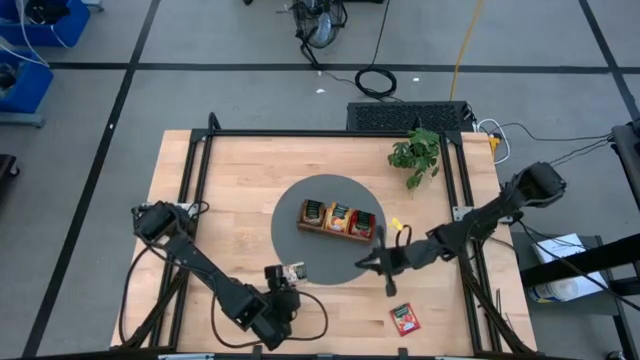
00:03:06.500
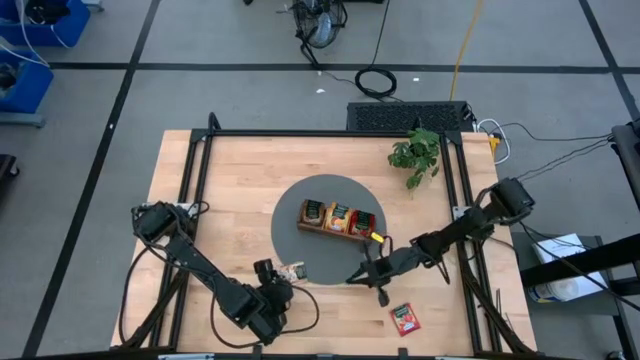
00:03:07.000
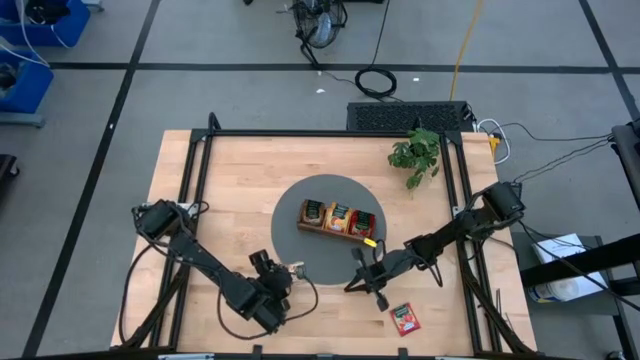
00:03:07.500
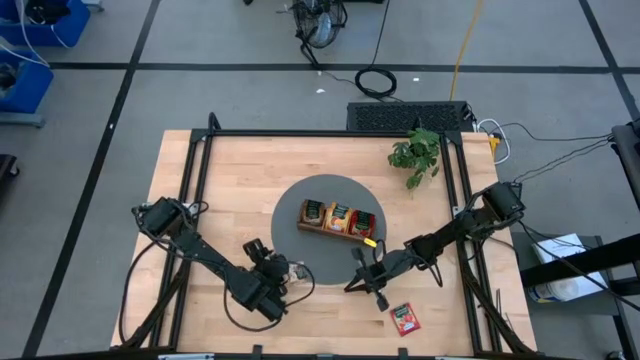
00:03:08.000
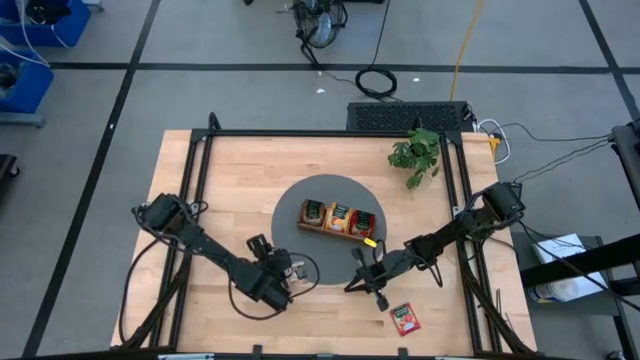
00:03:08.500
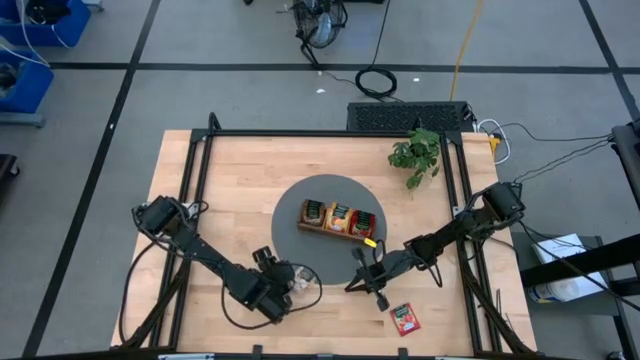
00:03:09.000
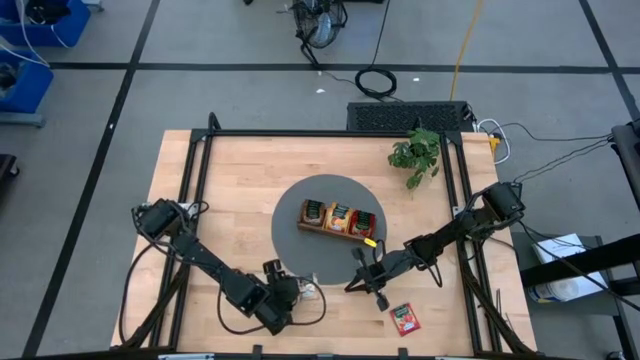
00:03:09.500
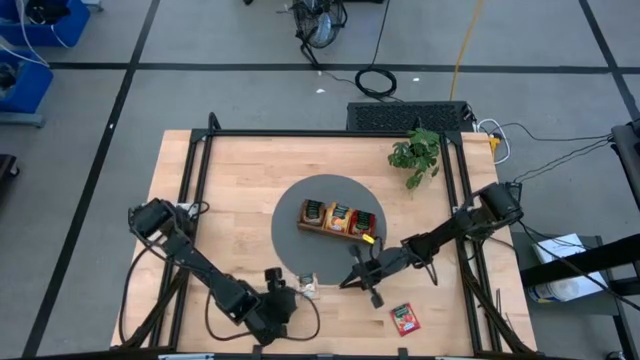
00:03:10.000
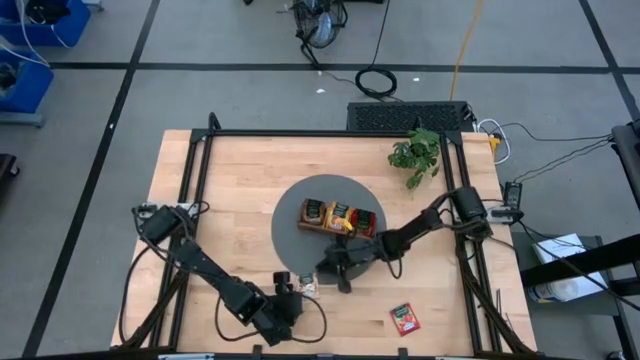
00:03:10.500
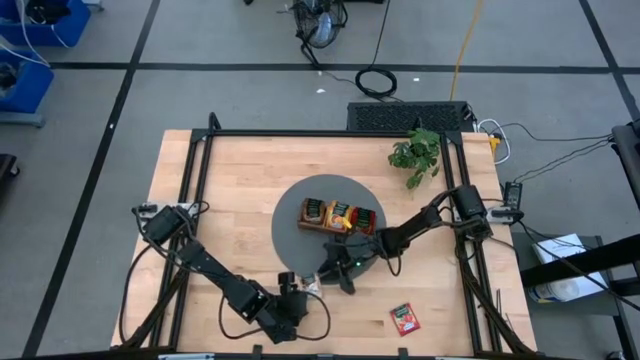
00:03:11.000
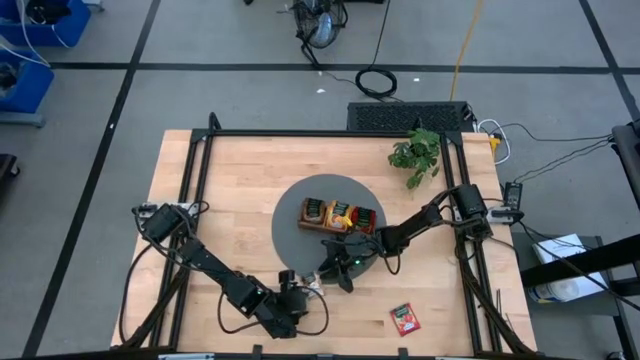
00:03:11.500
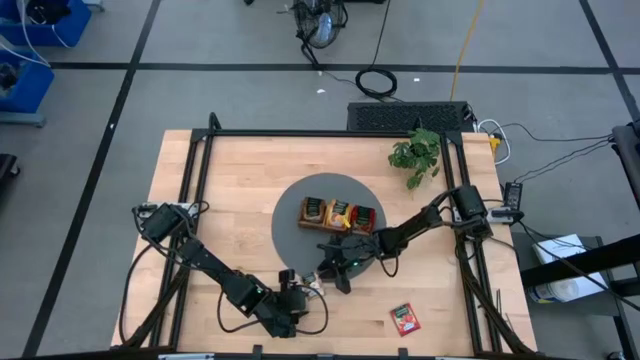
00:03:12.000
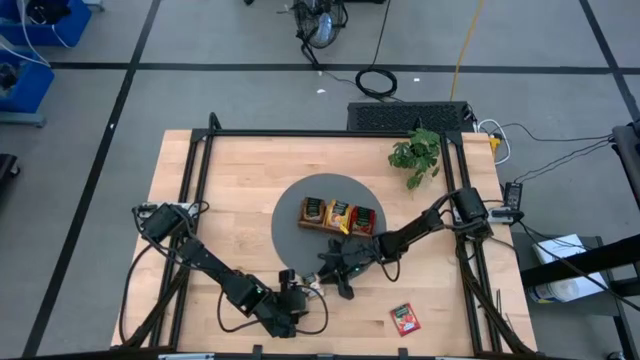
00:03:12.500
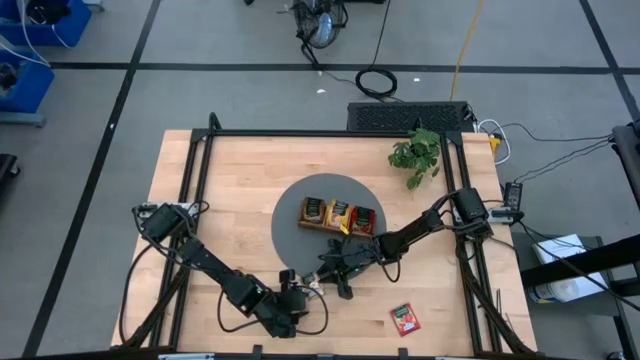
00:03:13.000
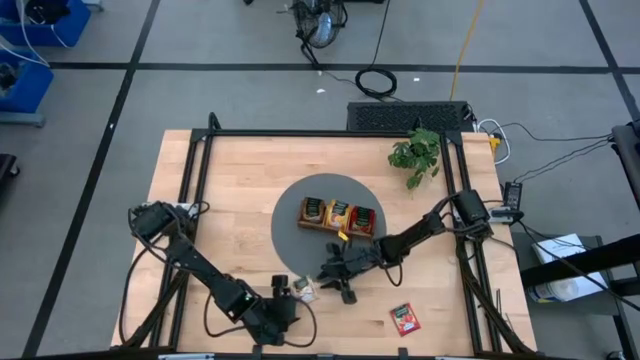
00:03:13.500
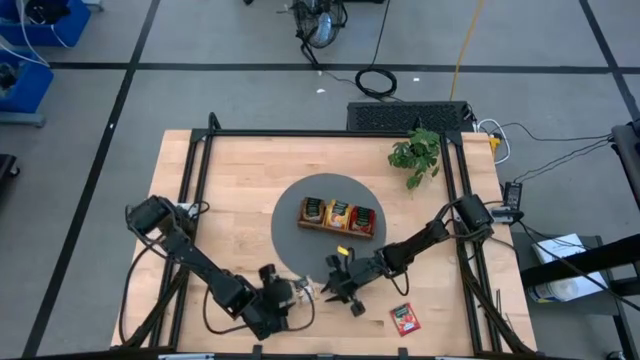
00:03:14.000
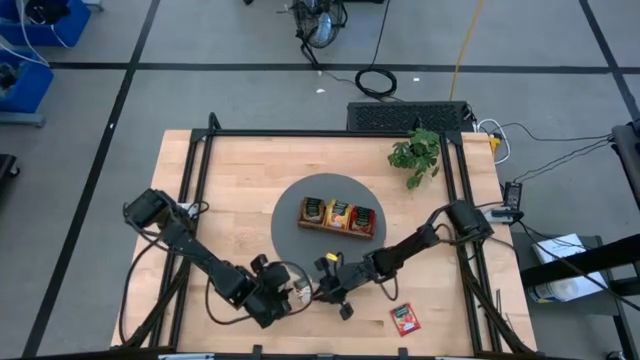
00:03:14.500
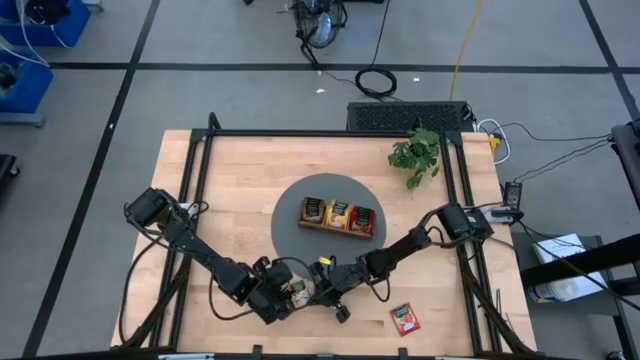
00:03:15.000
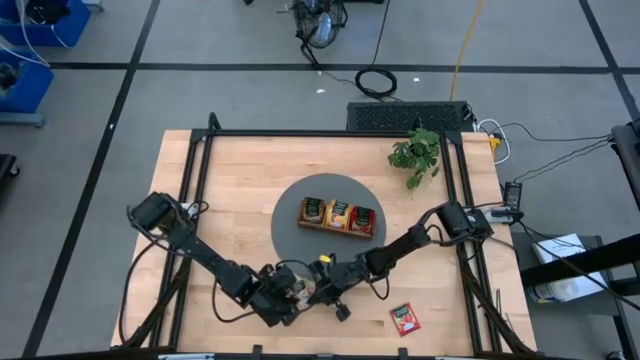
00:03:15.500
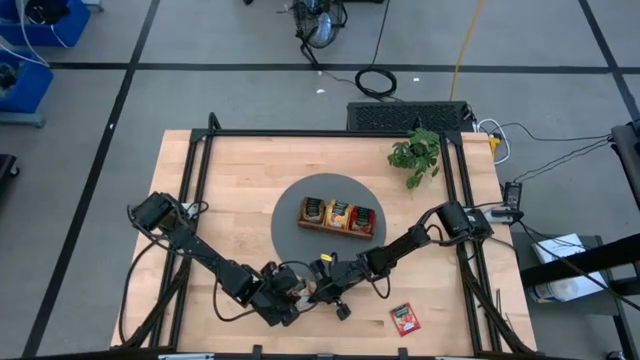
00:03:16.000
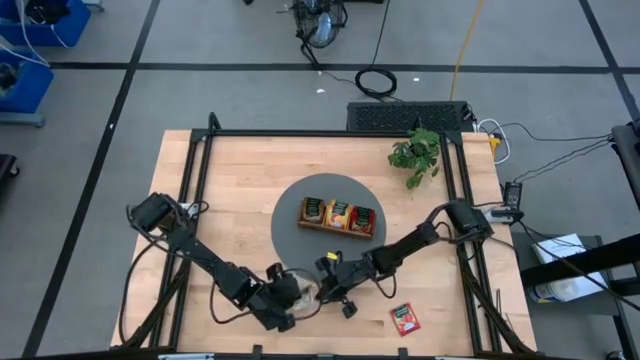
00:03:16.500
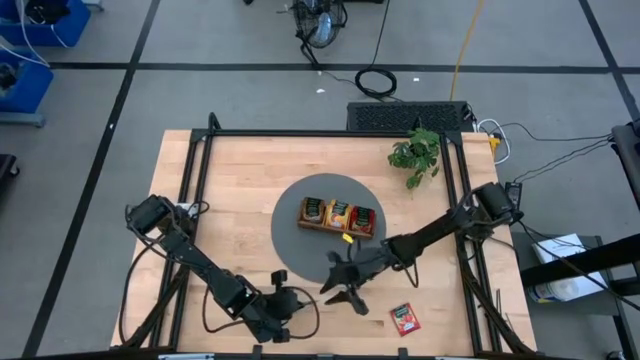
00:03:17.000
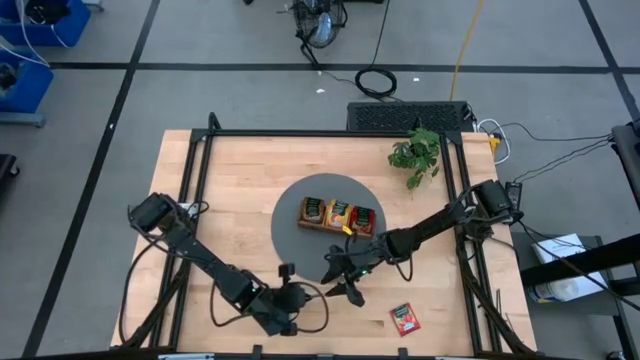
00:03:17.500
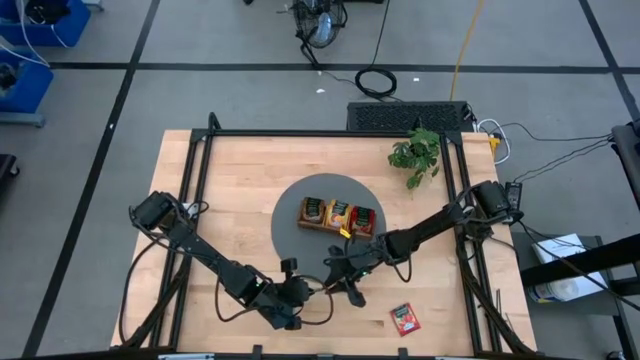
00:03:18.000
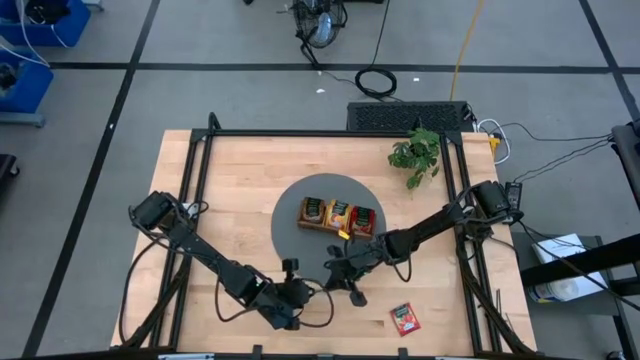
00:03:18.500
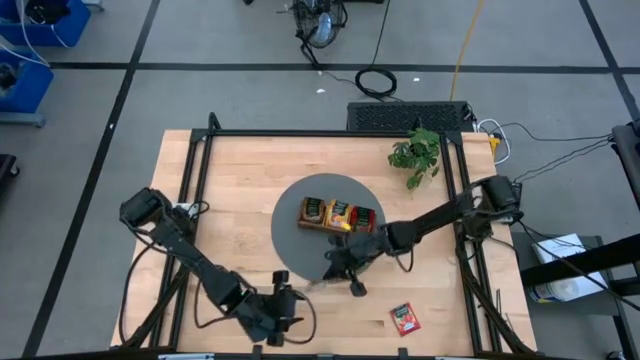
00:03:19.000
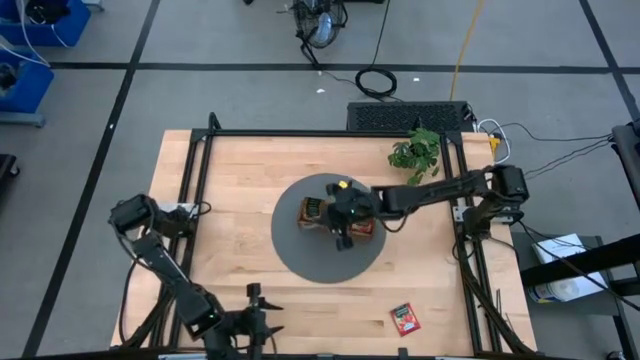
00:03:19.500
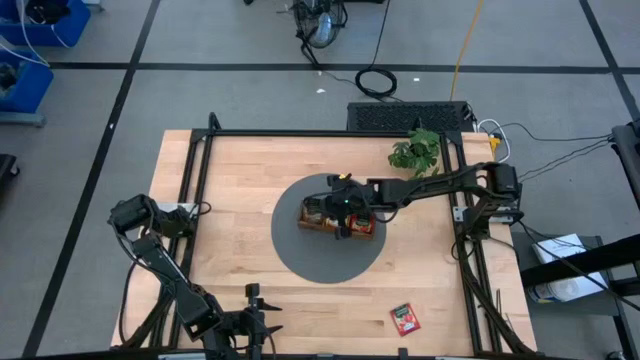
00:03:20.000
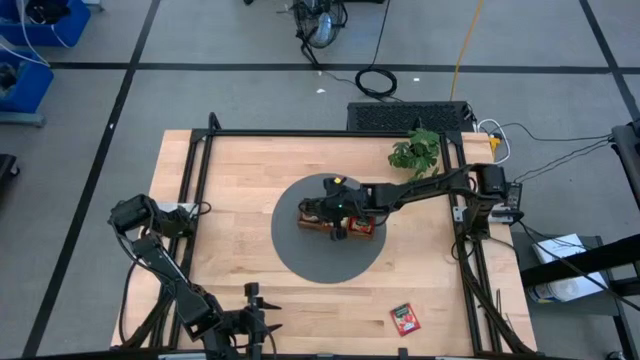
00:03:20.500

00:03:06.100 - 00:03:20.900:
Task: Pick & Place Tea
Put the gold tea bag into the left compartment of the wooden organizer

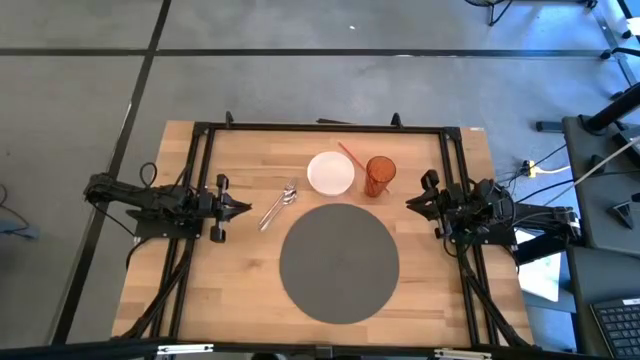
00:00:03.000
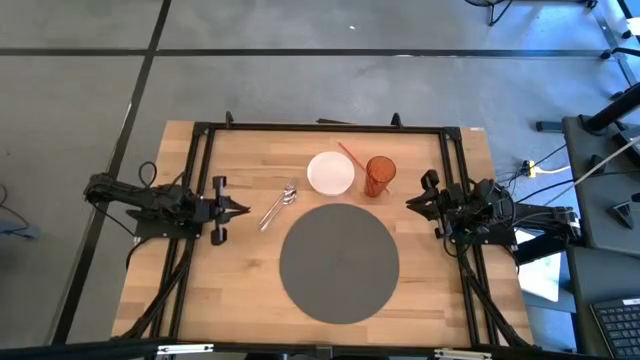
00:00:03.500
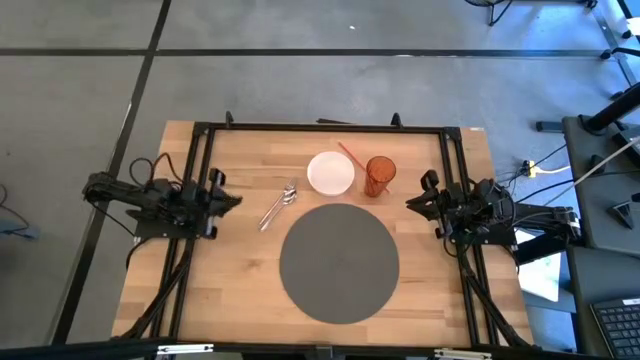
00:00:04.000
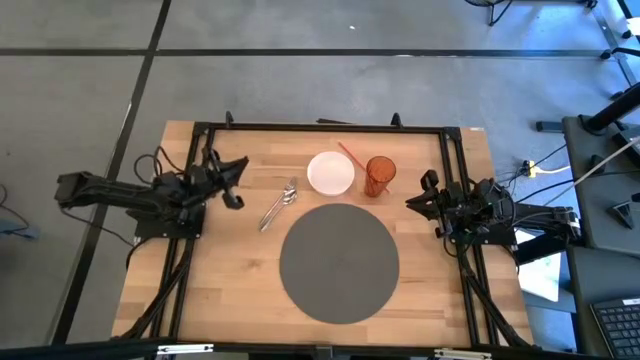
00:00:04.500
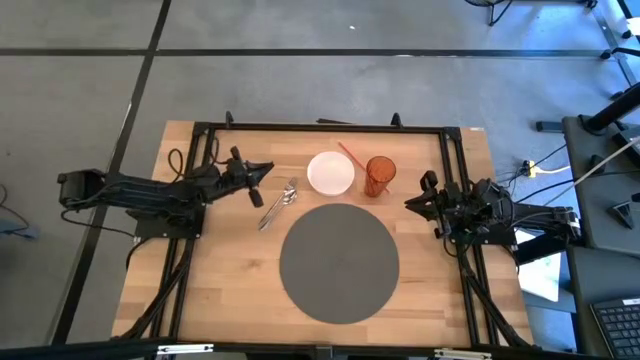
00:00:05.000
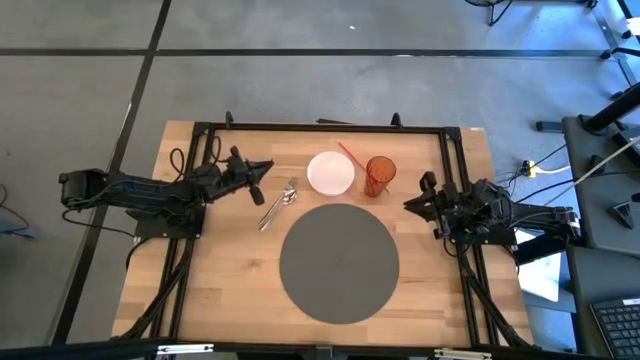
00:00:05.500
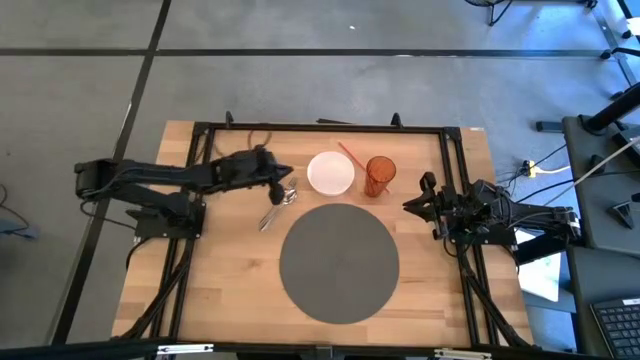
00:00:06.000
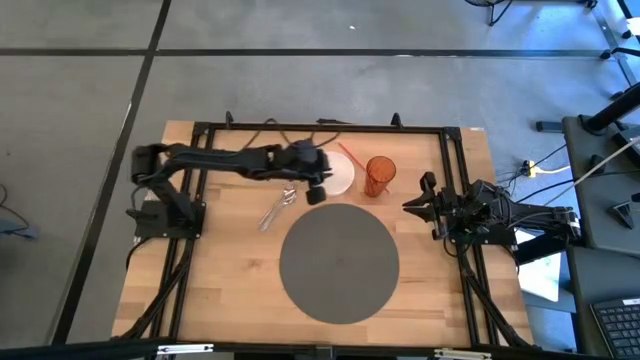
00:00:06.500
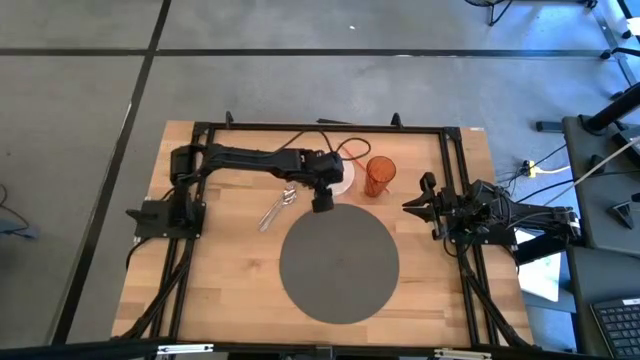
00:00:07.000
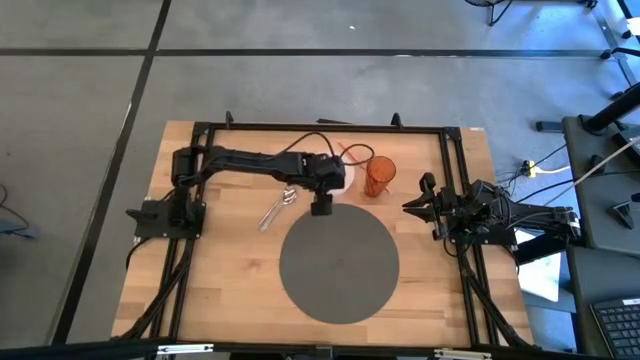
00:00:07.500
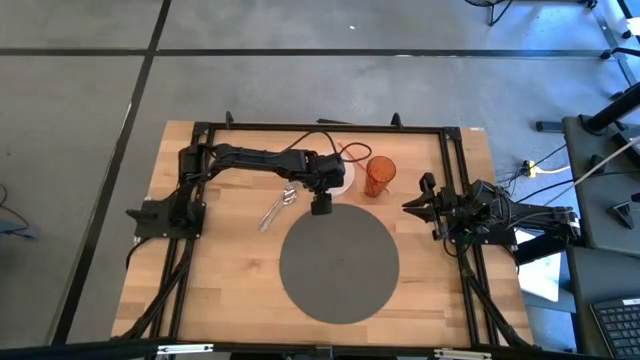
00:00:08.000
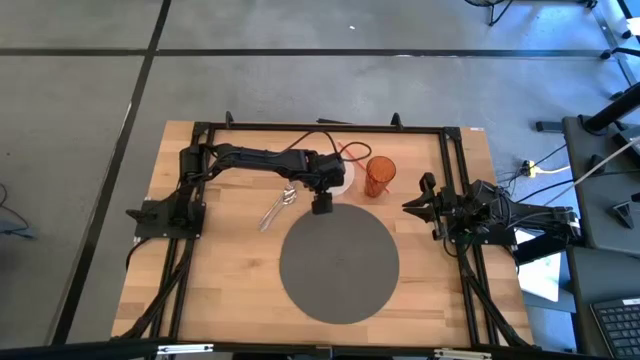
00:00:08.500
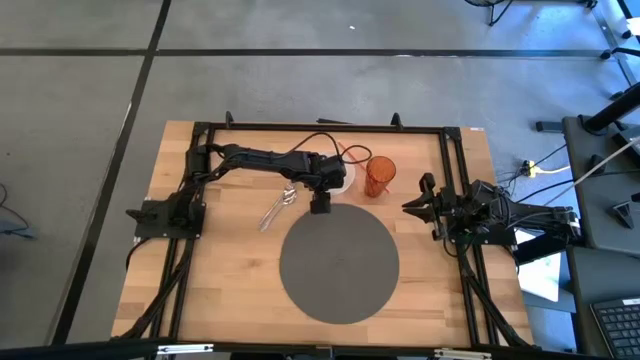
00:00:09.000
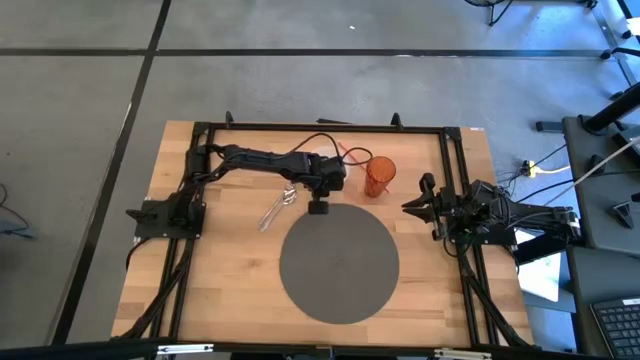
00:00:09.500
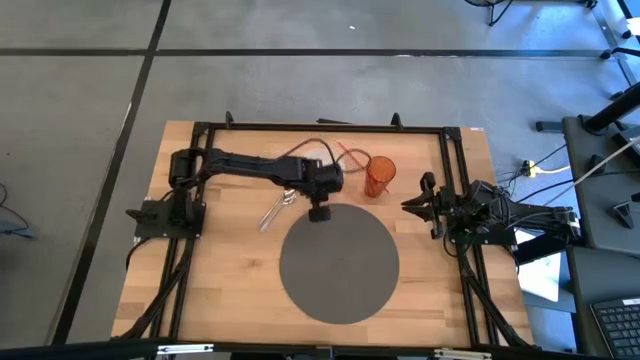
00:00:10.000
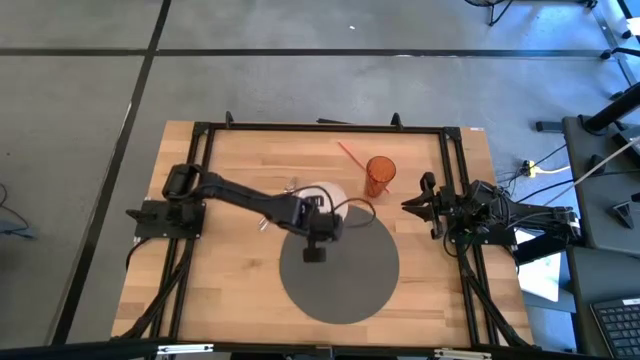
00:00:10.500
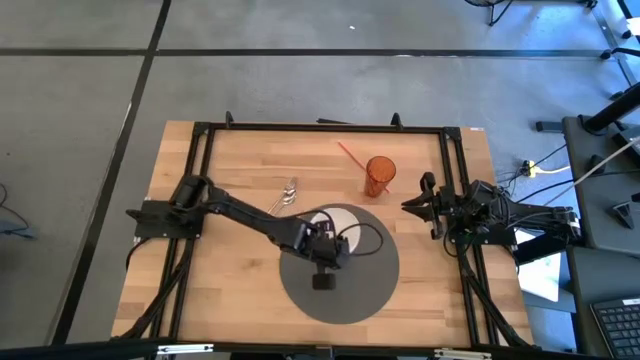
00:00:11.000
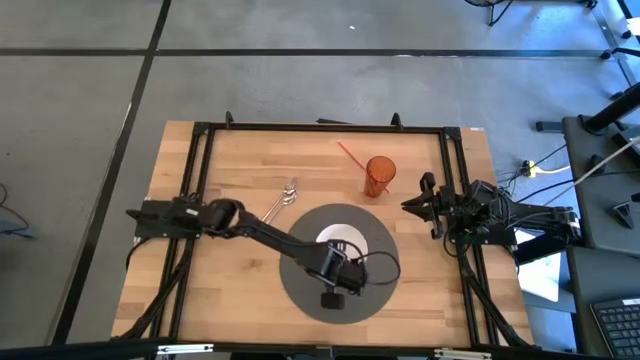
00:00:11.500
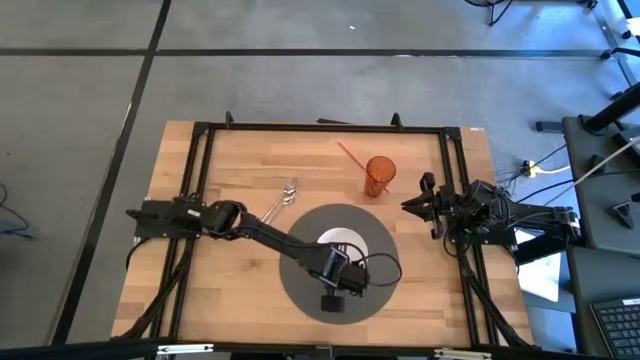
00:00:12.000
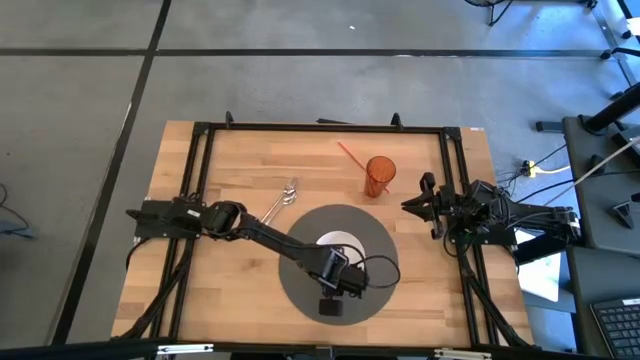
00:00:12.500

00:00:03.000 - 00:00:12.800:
Task: Pick & Place Utensil
Put the white bowl on the gray placemat
